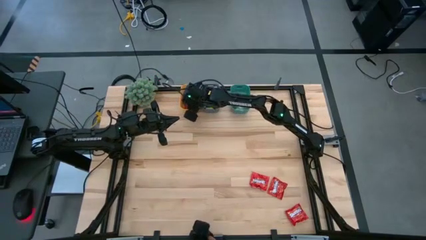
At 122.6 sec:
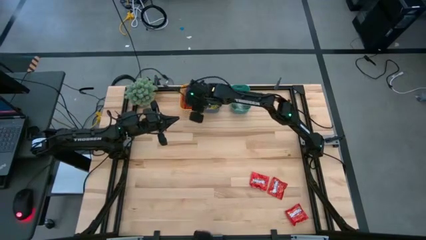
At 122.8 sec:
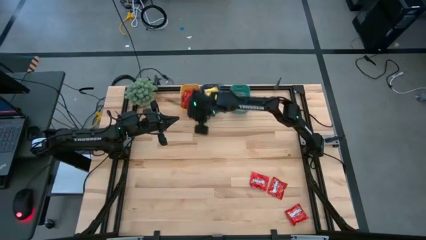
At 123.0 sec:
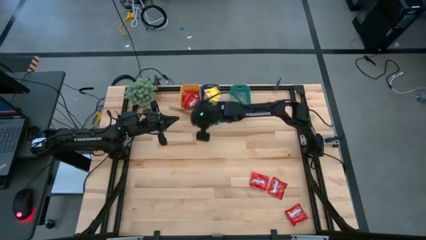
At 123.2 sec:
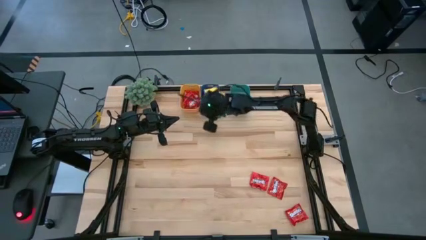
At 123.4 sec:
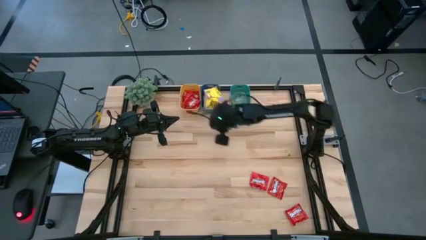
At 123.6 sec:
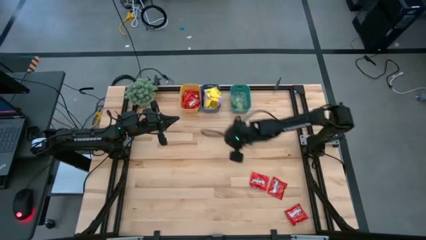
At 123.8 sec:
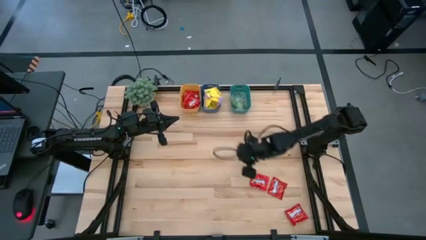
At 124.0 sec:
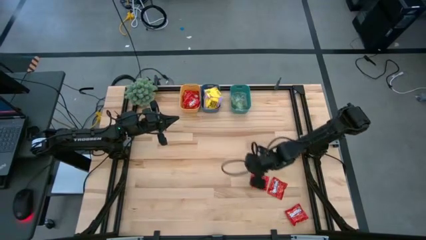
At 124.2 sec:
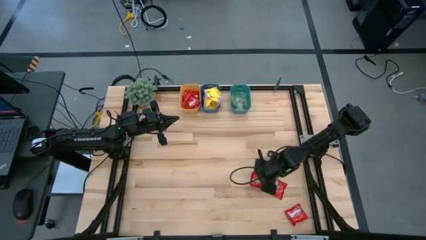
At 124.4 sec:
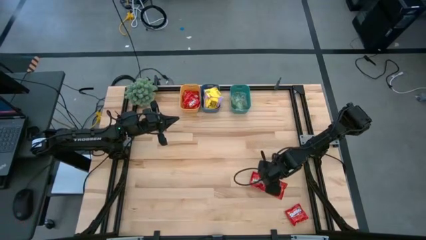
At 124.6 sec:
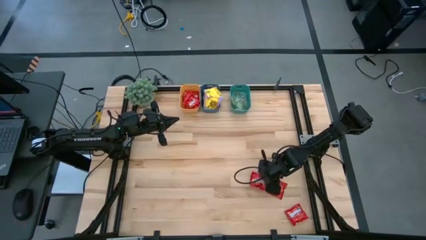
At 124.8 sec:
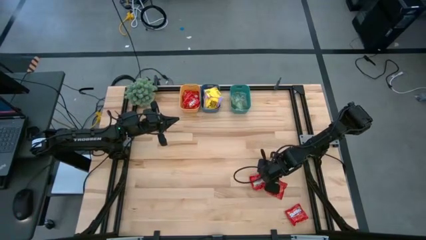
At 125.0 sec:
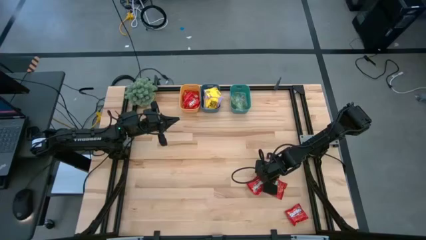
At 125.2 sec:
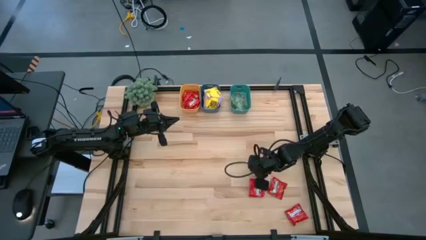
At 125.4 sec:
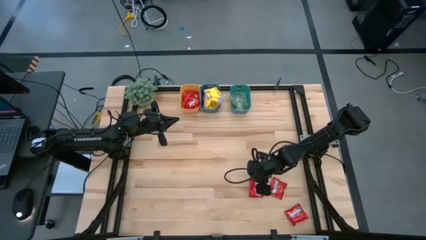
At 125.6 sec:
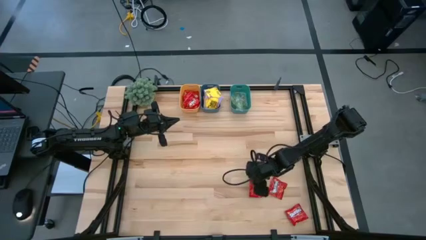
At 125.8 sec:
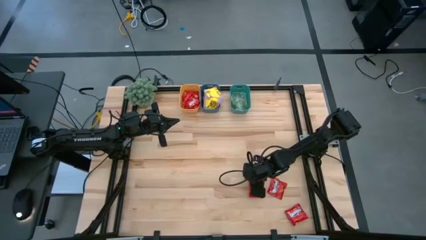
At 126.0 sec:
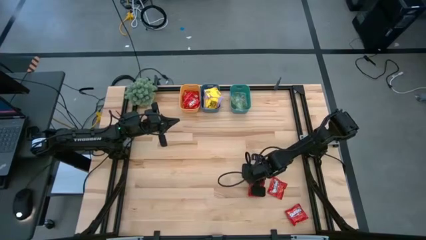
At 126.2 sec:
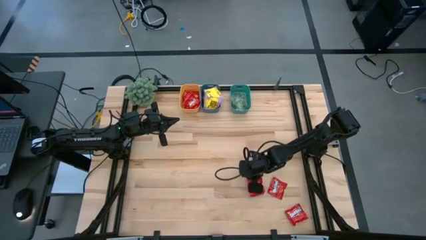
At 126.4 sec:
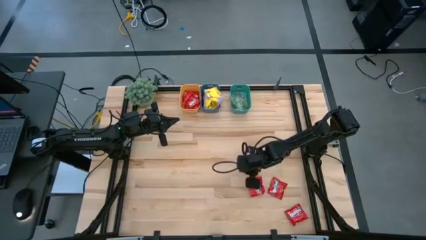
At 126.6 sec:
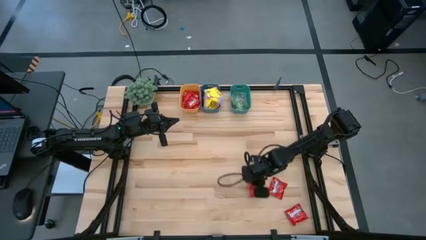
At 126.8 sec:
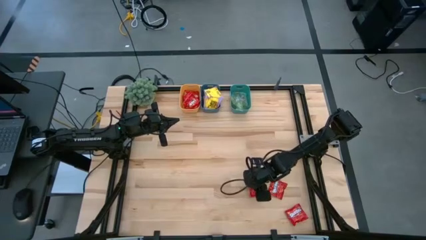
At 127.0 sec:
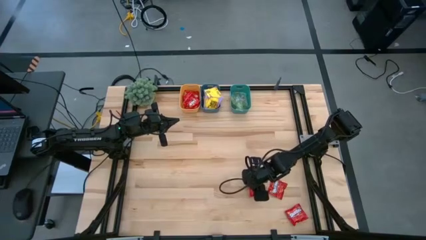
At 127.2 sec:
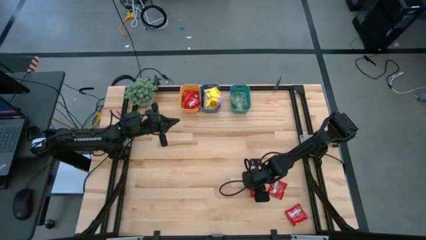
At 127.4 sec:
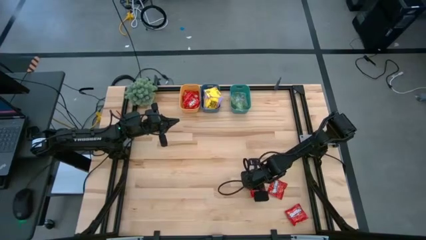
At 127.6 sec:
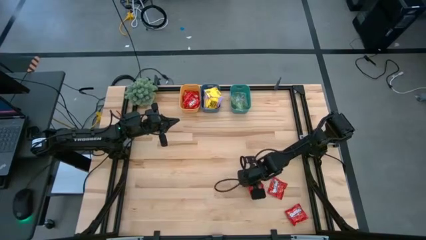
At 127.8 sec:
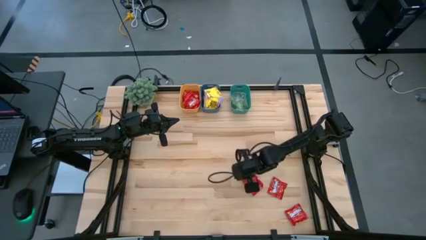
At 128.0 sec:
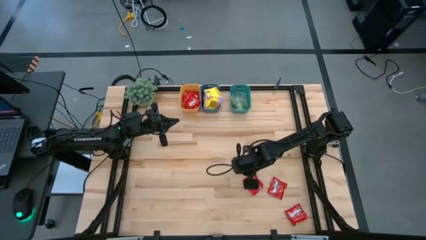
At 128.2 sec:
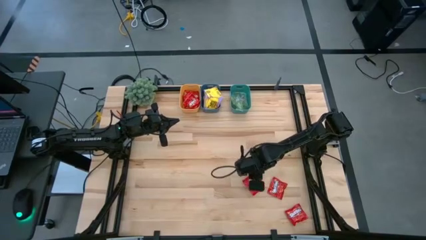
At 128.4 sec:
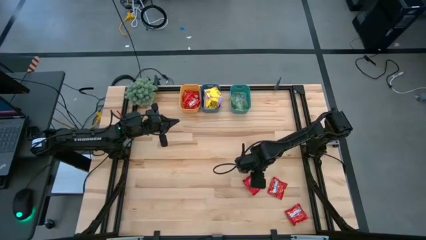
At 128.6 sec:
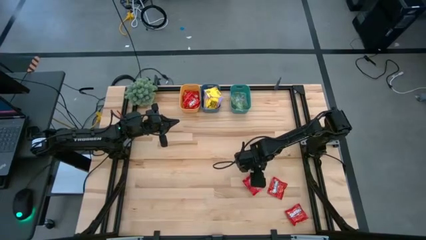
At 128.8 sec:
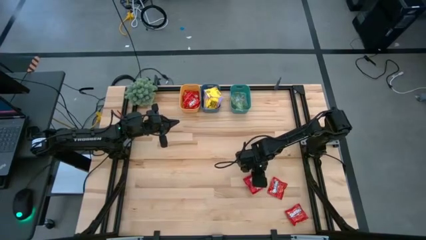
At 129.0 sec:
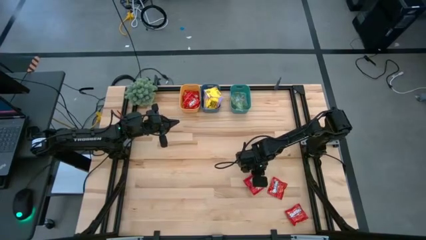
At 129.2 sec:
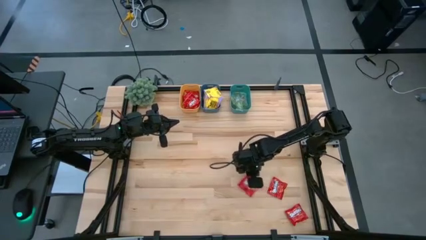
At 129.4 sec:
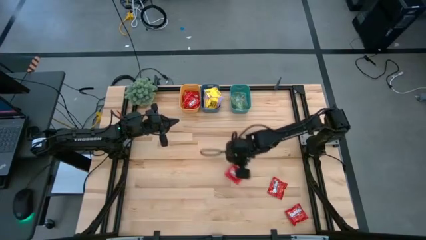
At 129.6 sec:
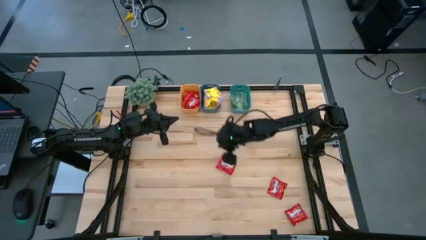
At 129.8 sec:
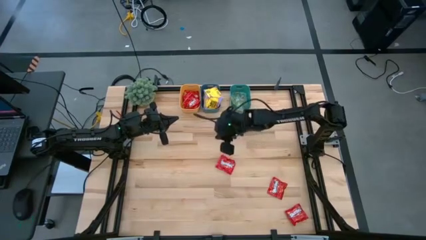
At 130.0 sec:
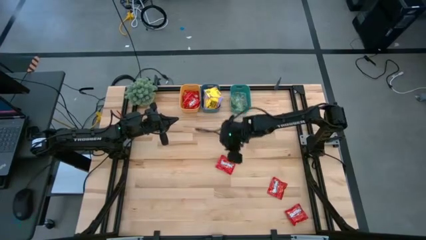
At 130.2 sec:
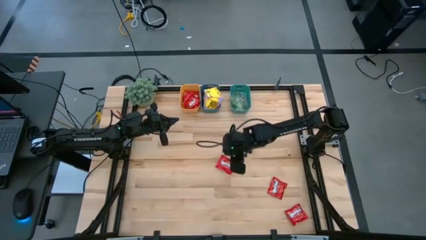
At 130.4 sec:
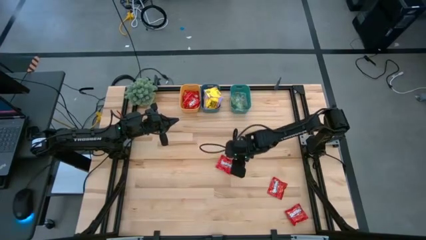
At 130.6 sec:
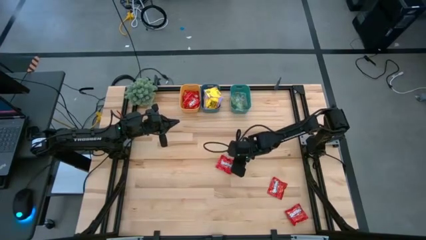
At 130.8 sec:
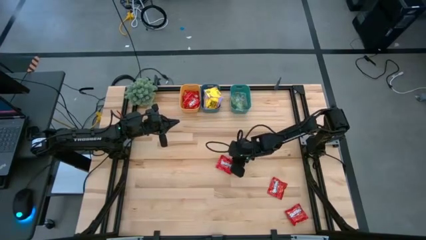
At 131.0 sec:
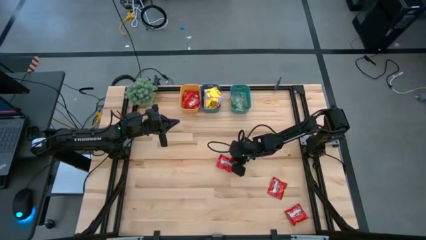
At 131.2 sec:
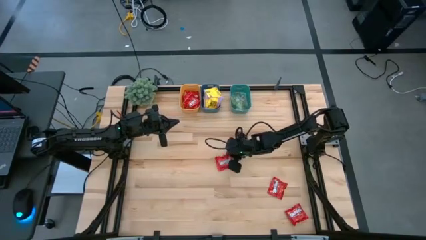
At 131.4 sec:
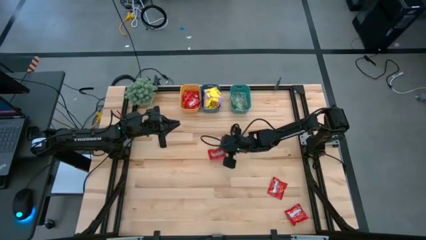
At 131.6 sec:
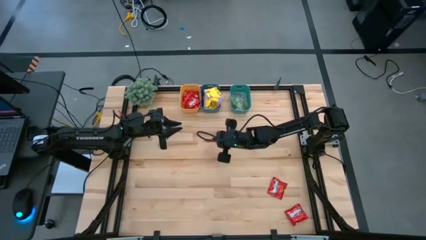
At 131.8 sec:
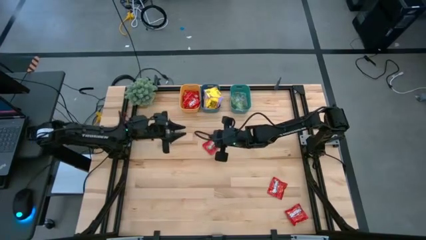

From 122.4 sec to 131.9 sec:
Task: Sort candy
Put the red candy pack into the yellow bin

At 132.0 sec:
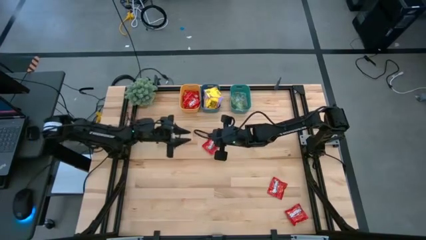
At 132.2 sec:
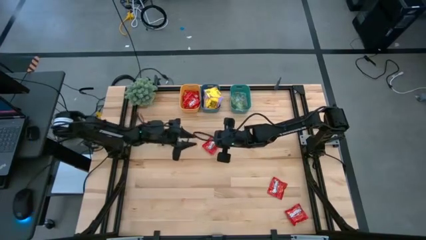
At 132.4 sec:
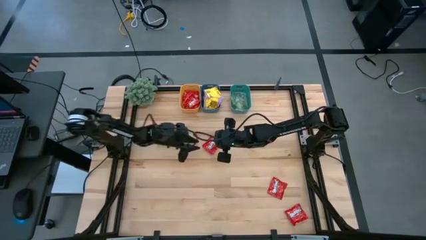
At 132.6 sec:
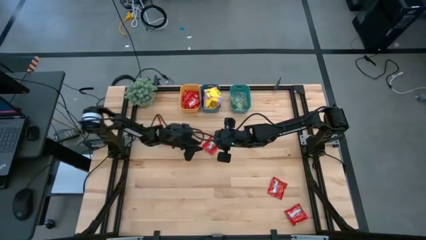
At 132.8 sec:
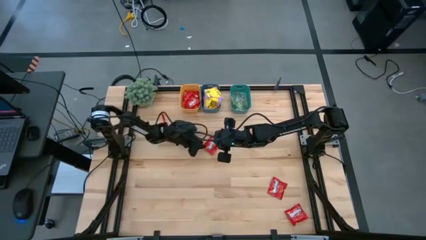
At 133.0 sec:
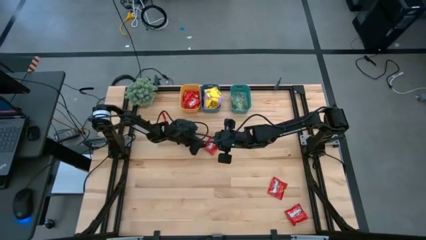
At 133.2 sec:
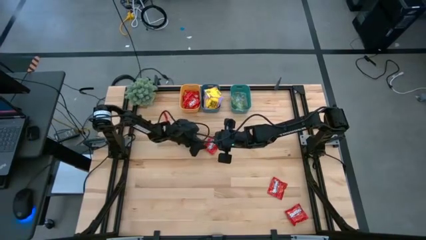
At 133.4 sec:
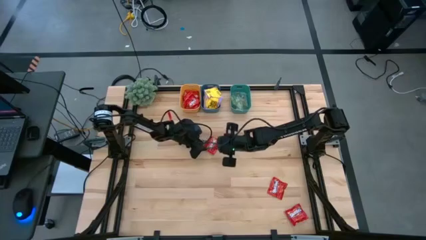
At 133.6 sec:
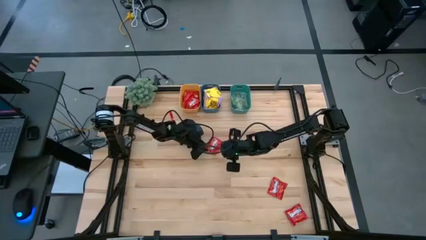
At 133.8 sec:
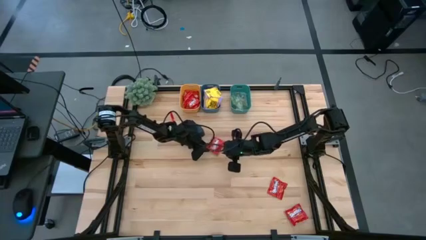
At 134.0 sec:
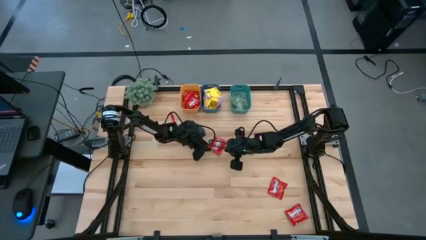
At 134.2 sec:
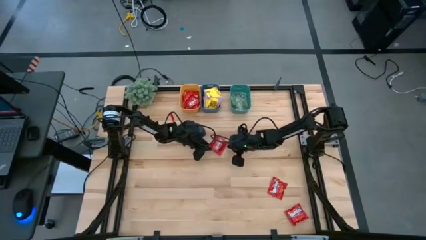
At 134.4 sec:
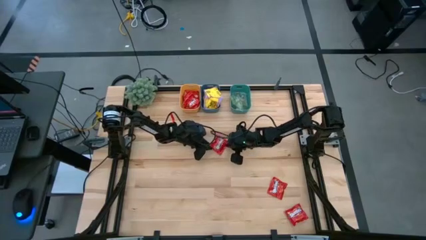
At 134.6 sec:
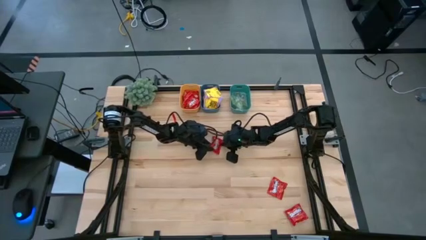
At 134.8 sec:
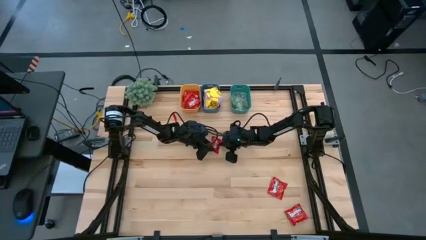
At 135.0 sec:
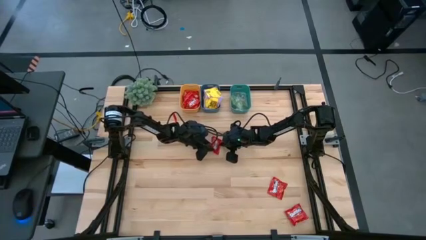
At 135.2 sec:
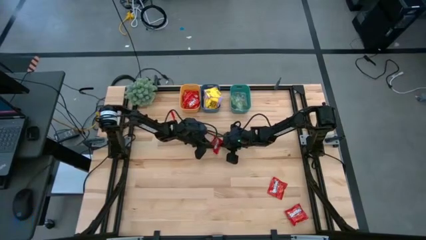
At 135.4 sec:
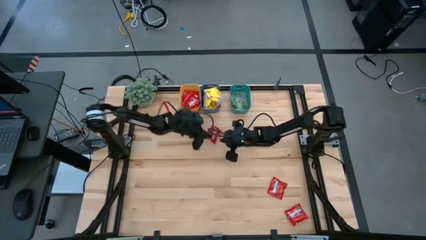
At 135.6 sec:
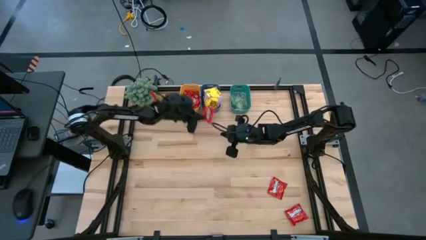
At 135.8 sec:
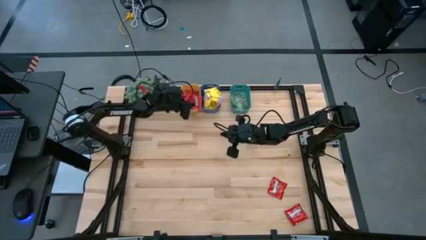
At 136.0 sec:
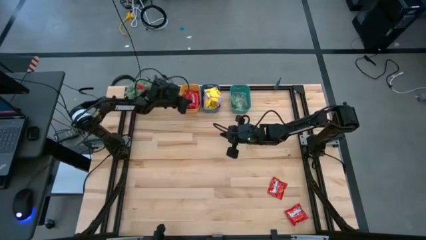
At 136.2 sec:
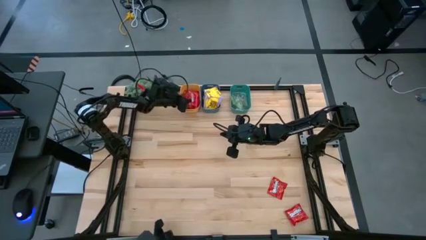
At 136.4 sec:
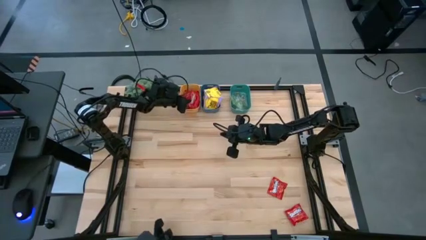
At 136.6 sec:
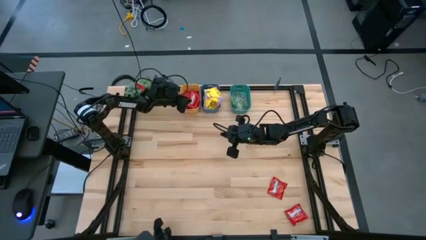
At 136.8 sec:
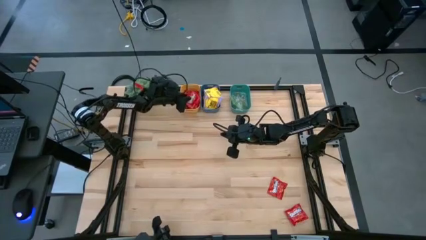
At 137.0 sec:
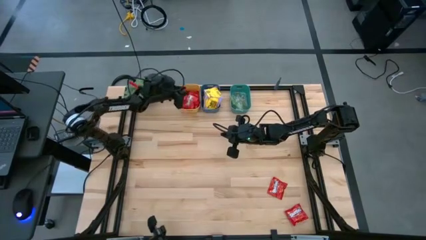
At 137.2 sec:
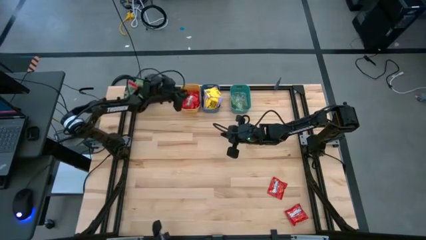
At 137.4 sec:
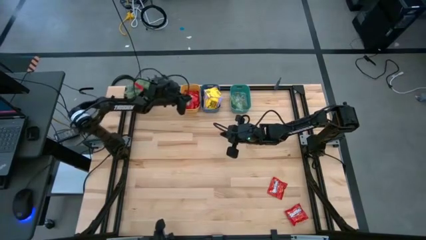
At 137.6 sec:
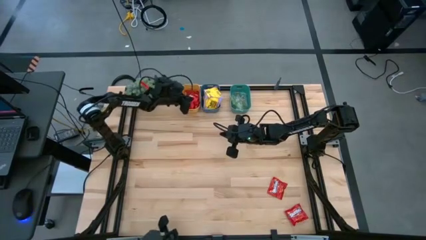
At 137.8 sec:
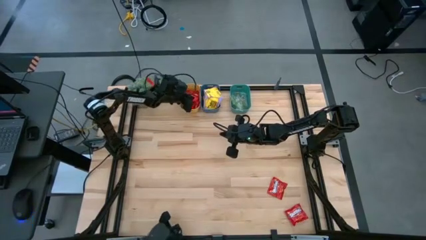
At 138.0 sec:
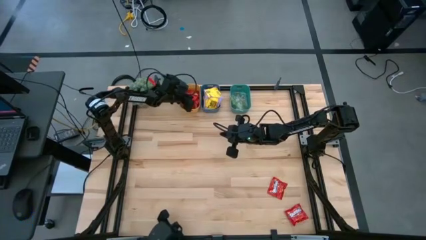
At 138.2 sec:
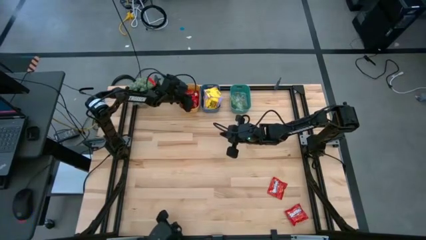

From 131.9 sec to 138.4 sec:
Put the red candy pack into the yellow bin
